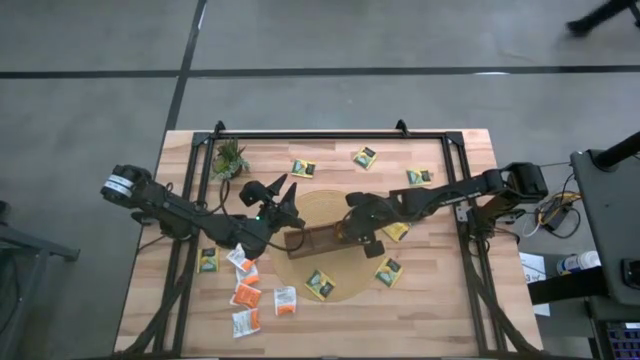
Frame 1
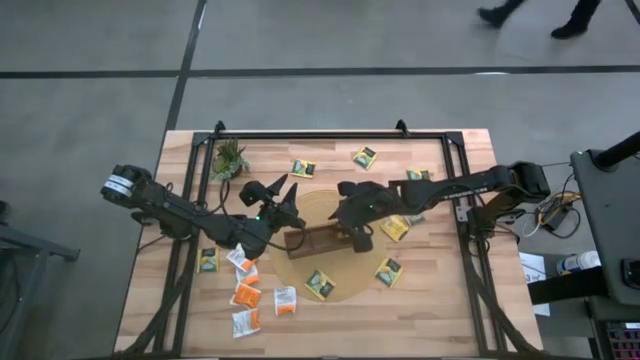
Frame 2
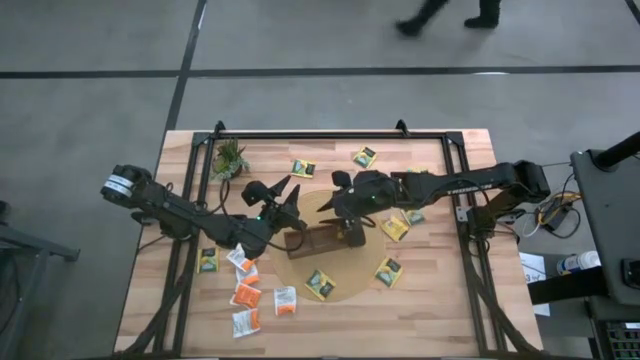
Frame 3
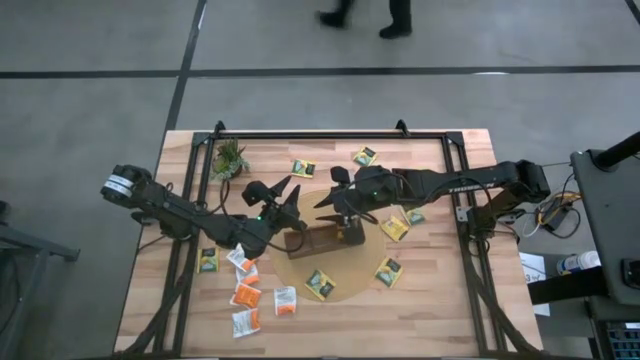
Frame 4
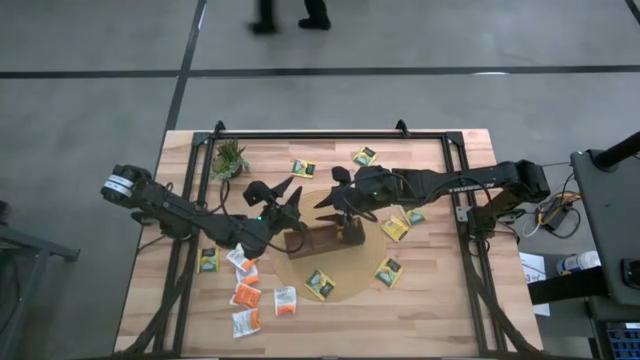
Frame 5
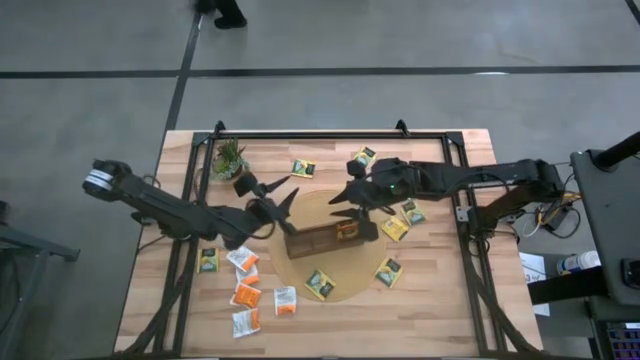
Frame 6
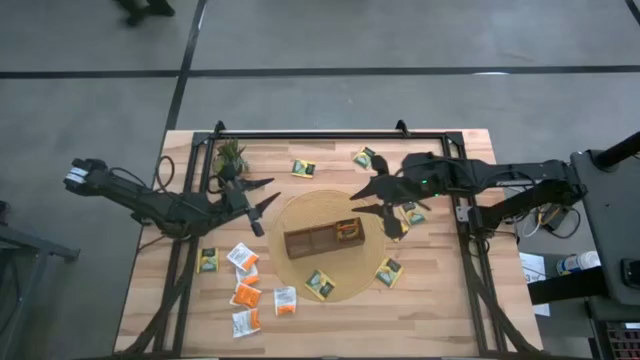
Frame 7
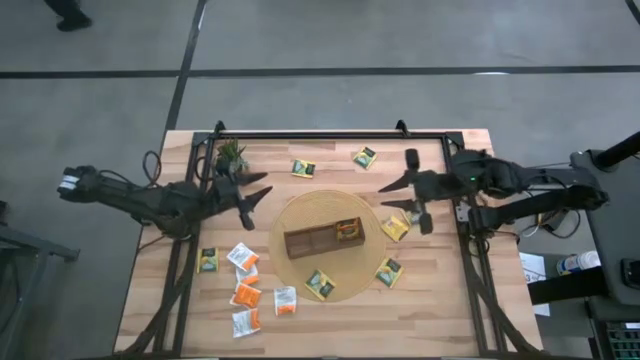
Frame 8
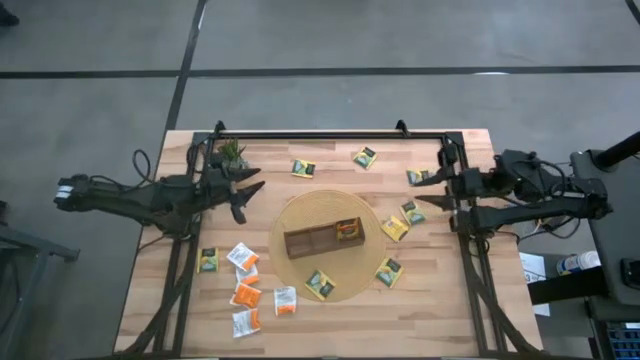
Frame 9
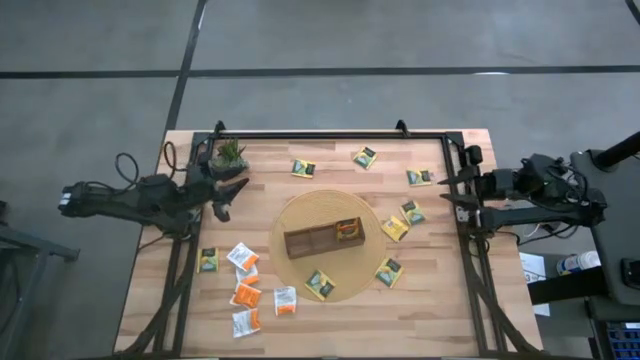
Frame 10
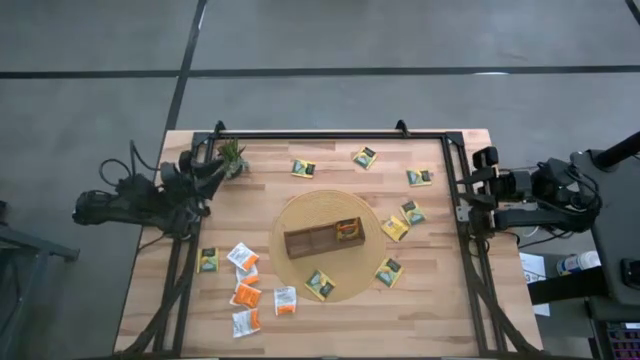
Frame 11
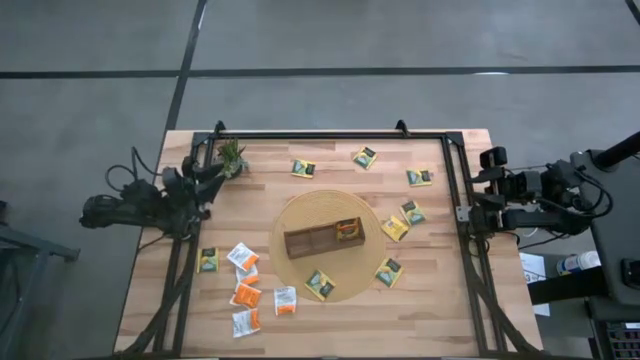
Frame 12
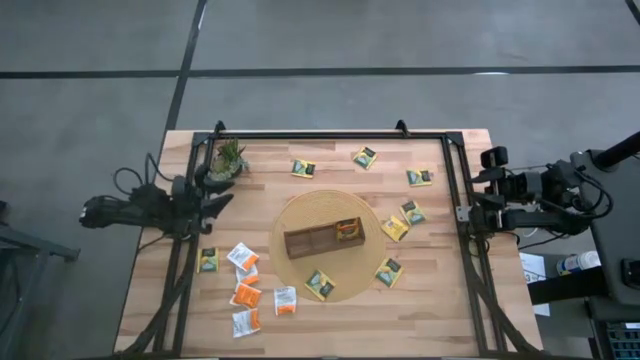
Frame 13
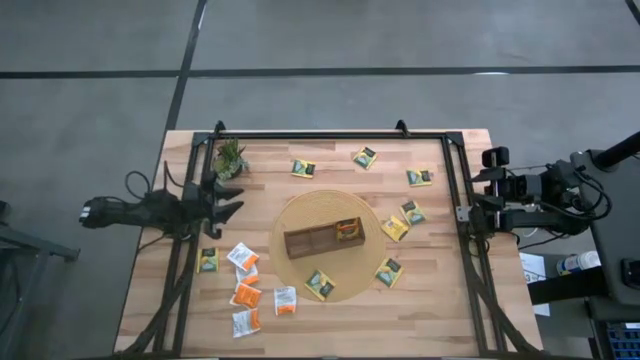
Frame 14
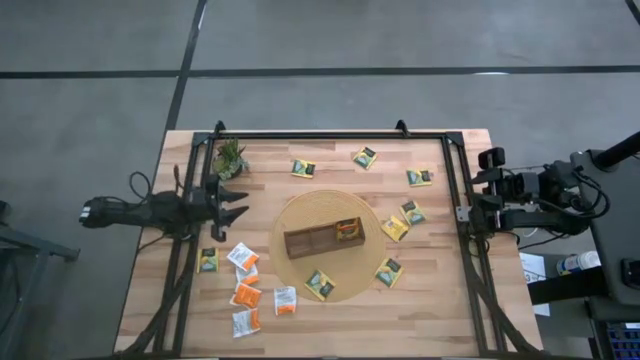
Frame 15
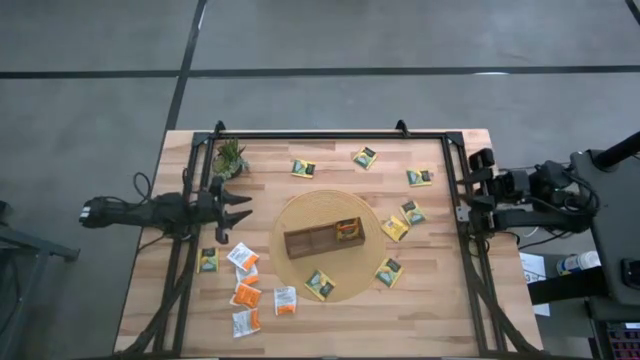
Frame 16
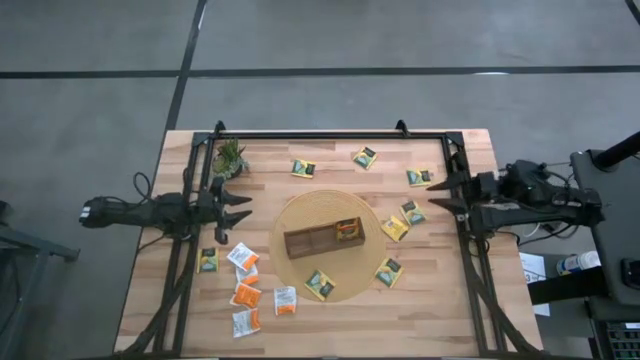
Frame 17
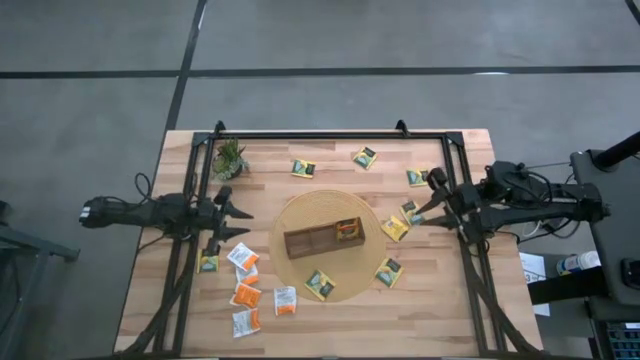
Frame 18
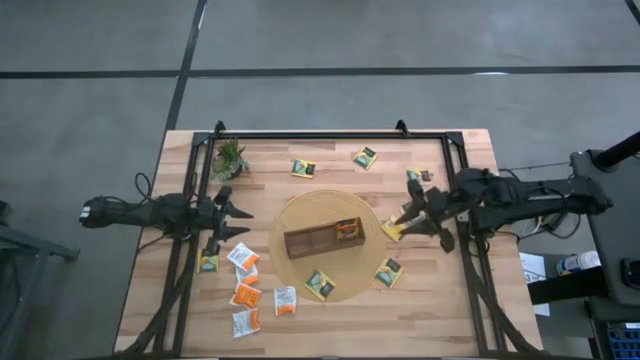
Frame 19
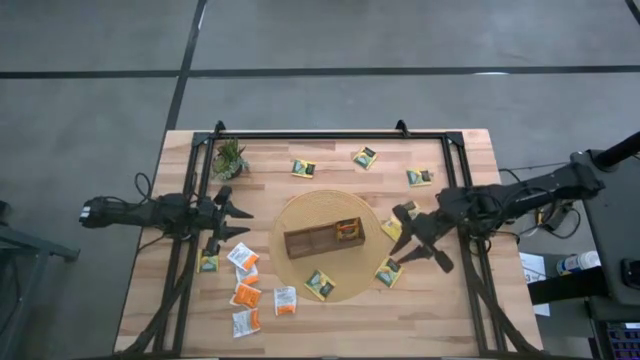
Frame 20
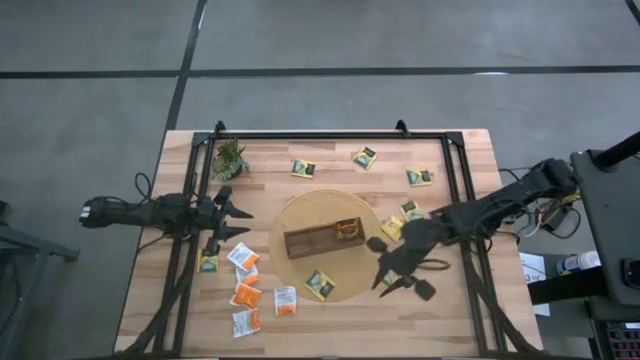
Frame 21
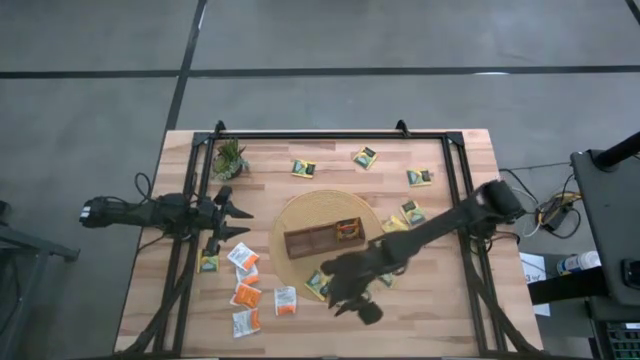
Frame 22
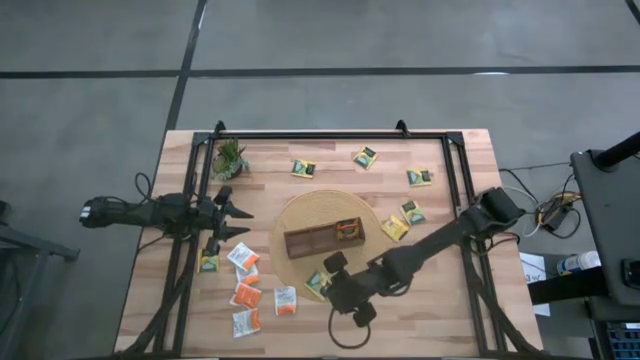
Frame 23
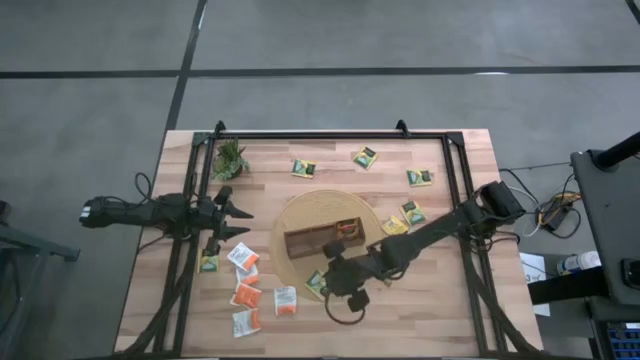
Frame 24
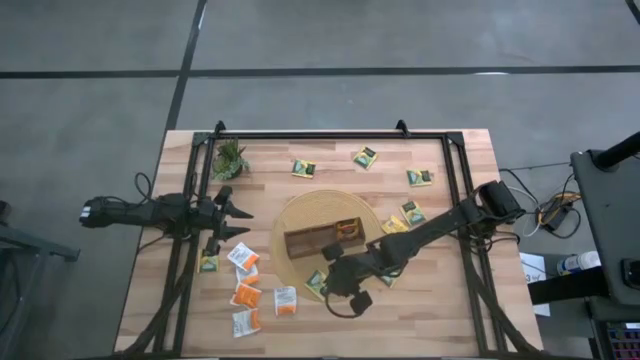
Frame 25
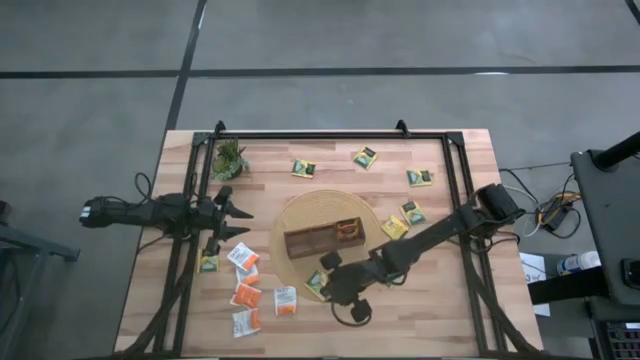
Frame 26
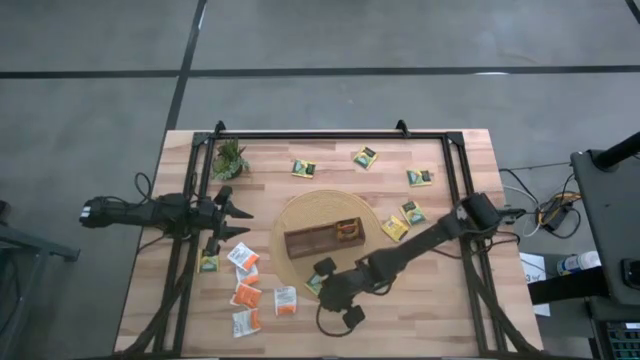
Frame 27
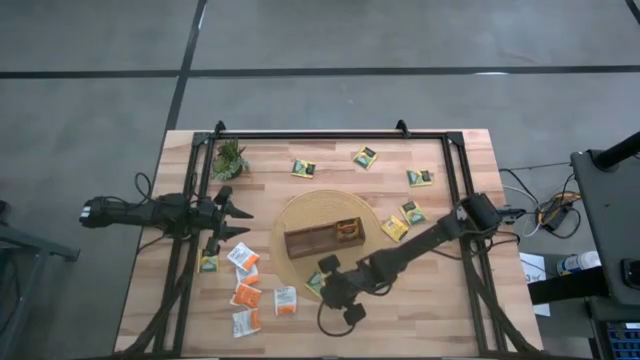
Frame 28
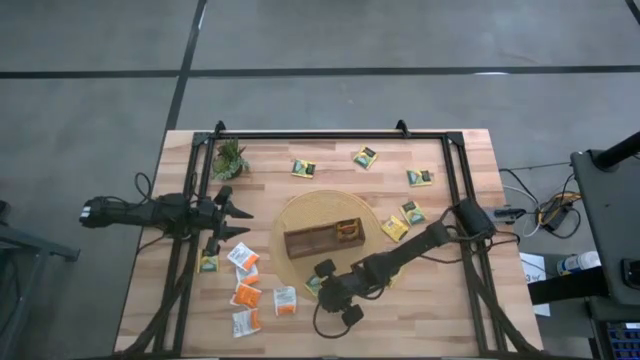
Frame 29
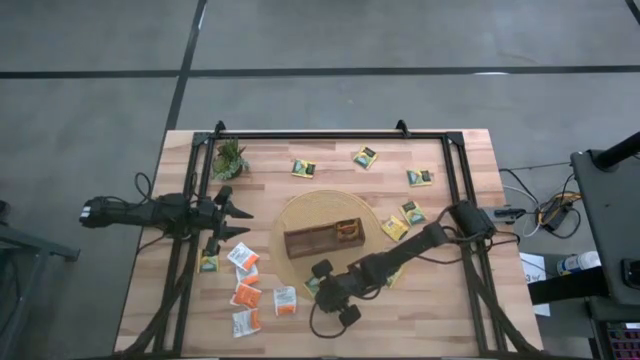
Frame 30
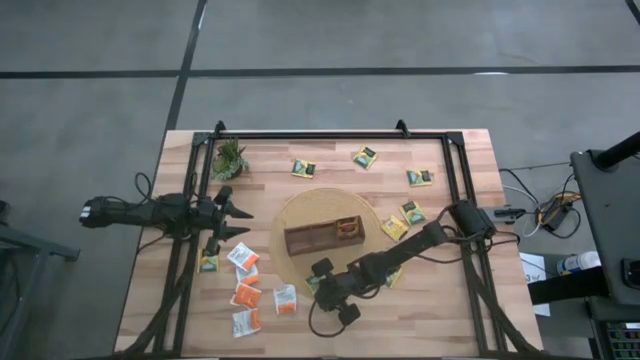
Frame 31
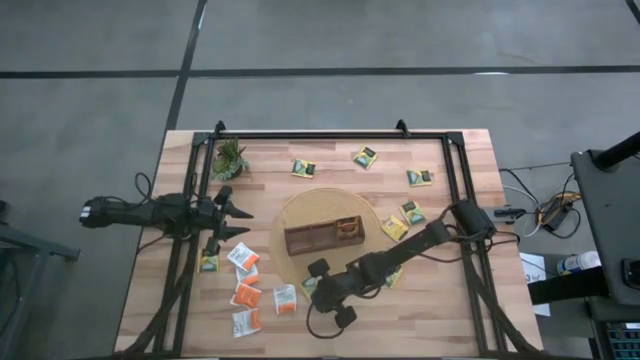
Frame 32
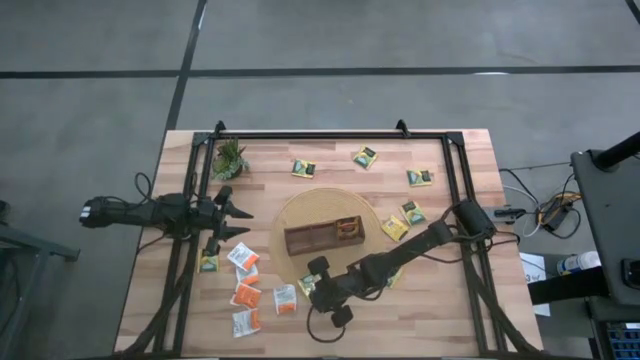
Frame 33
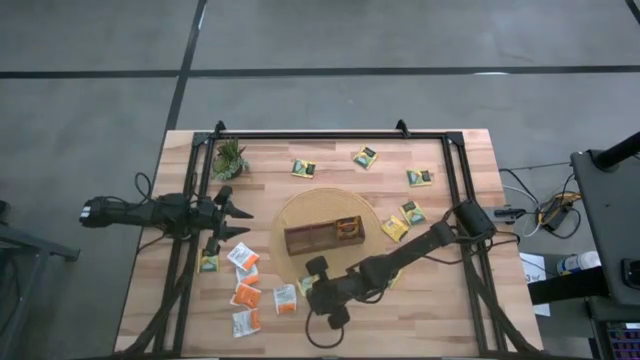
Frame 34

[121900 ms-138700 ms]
Task: Pick & Place Tea
Put the yellow tea bag into the middle section of the wooden organizer

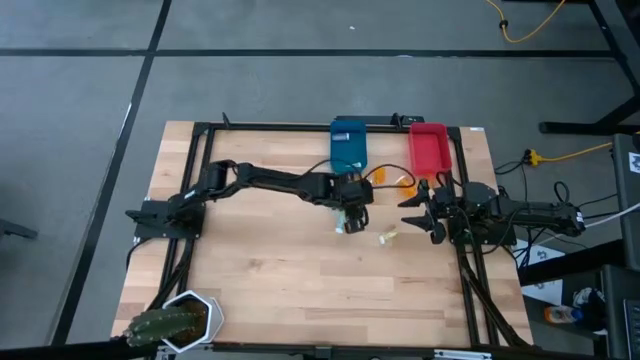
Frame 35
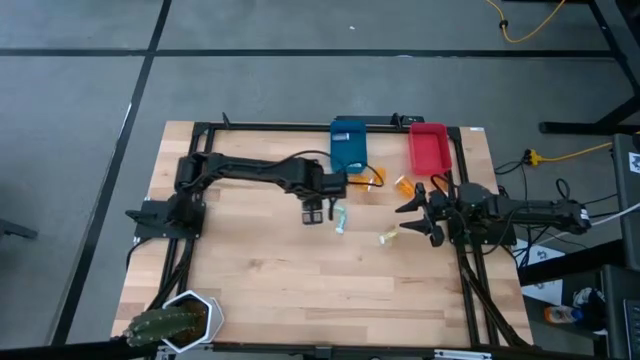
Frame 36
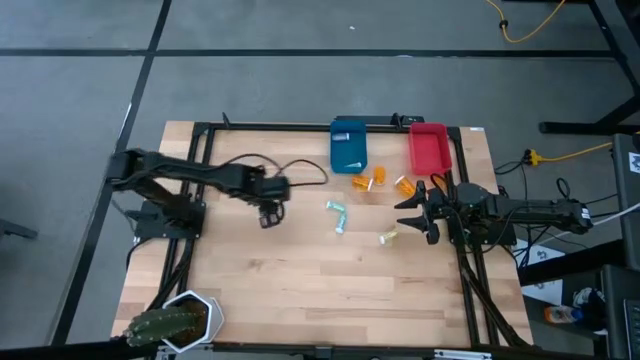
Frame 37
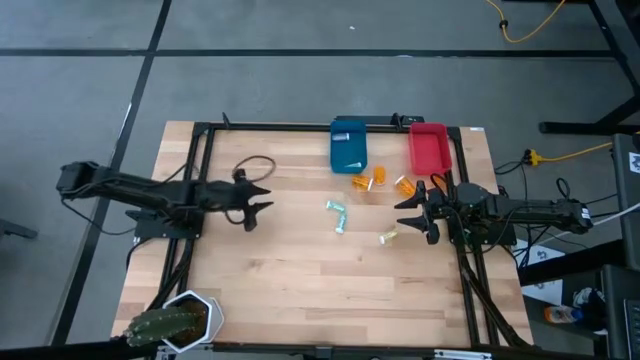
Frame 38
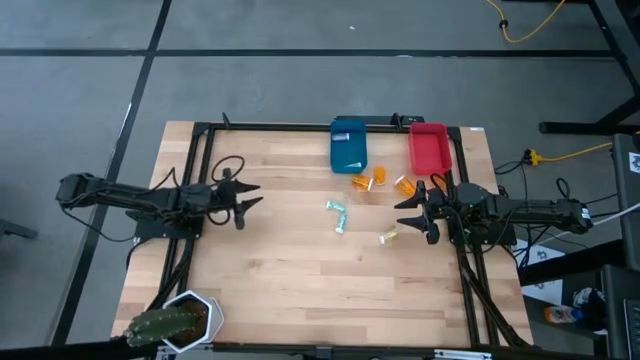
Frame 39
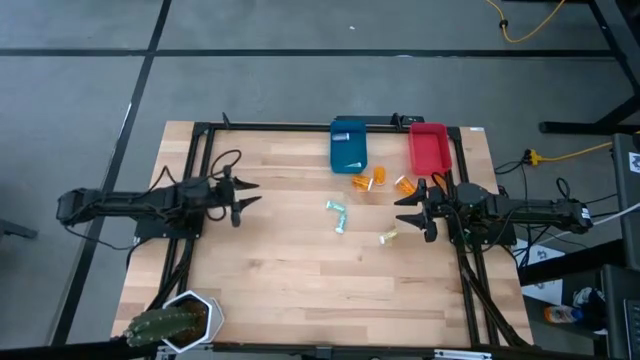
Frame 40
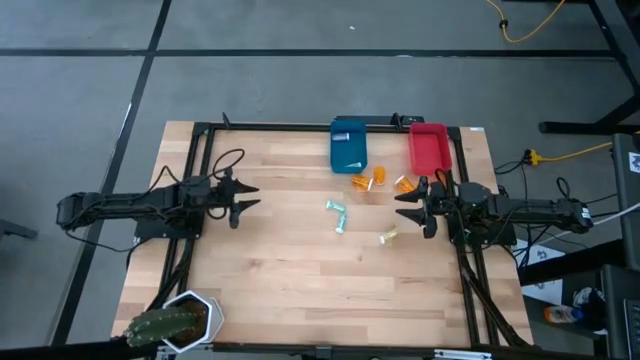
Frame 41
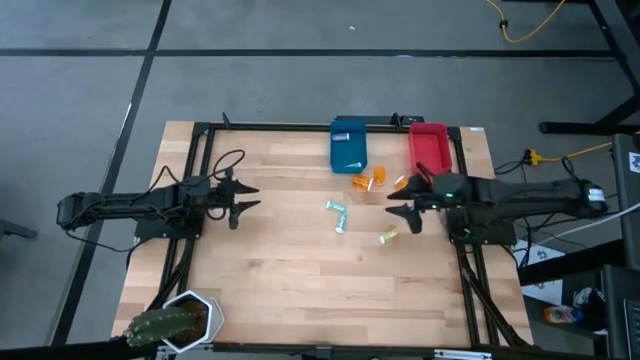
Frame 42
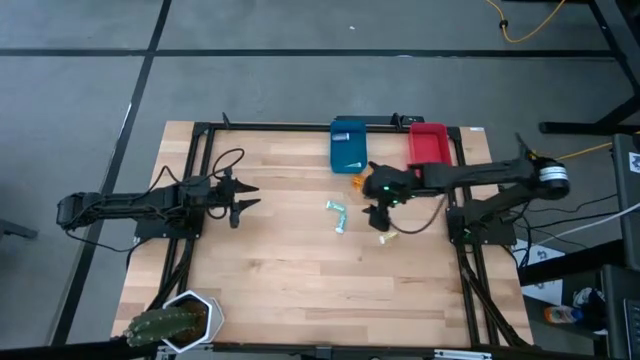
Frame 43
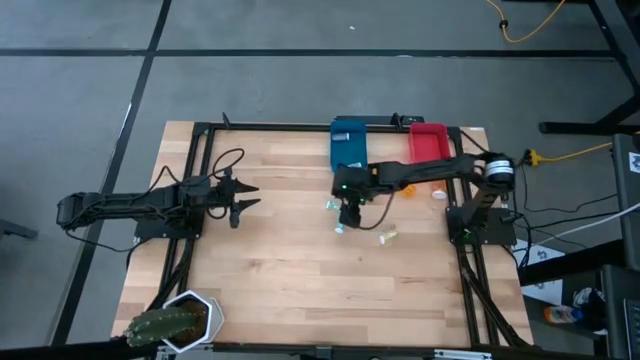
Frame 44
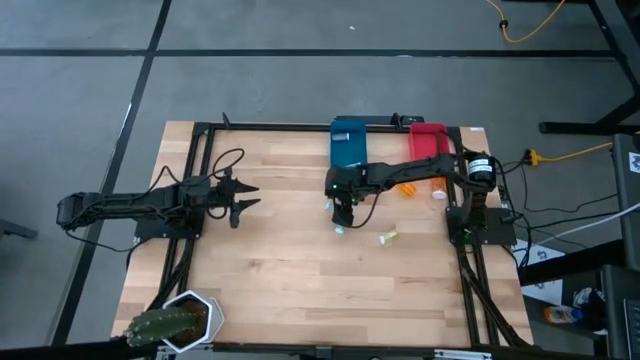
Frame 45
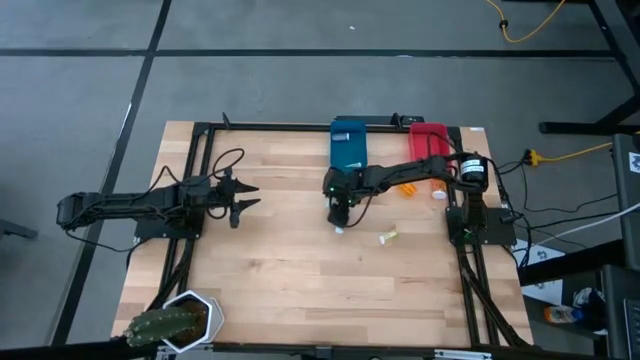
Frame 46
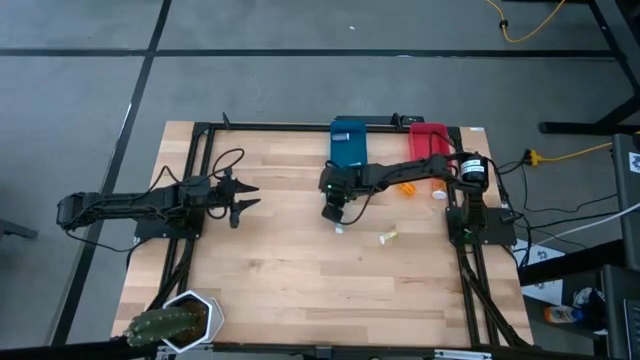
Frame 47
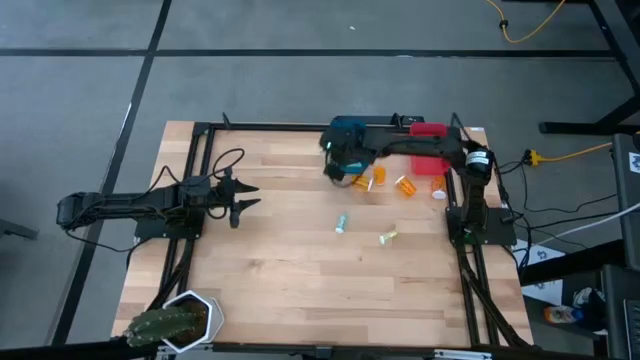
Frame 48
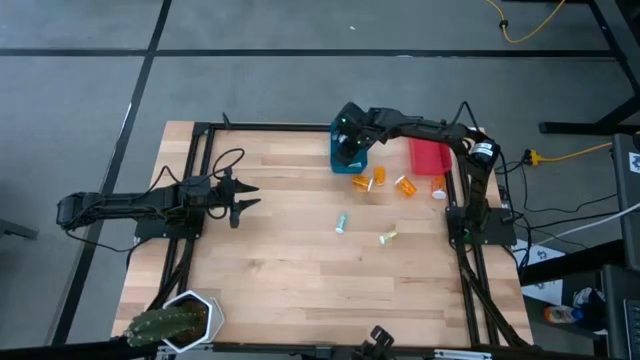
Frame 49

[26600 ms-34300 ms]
Task: Pick and place medicine bottles into bin by pill shape (circle, oval)
Put the small blue pill bottle into the blue bin
